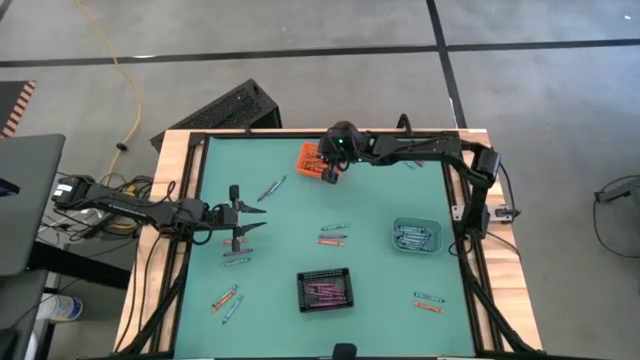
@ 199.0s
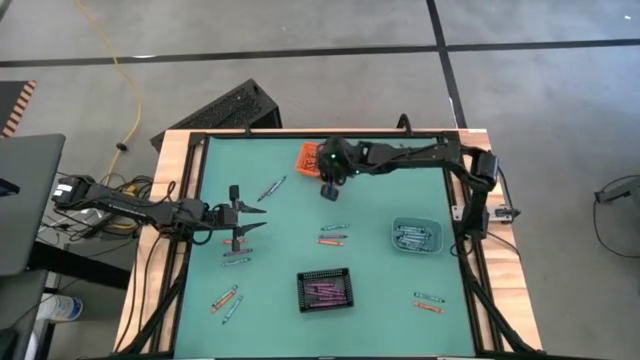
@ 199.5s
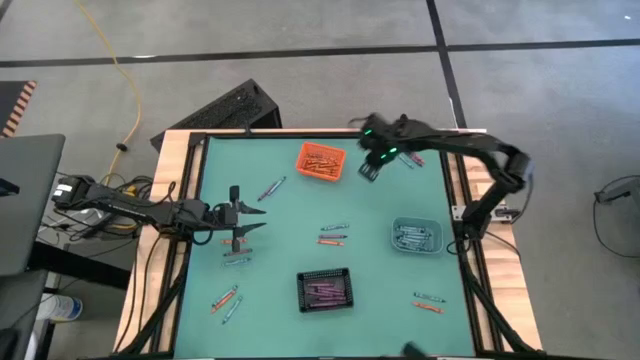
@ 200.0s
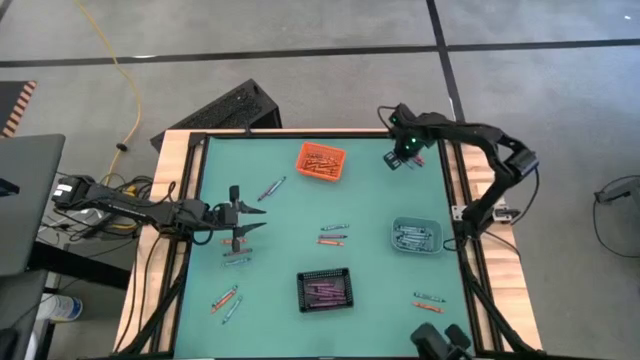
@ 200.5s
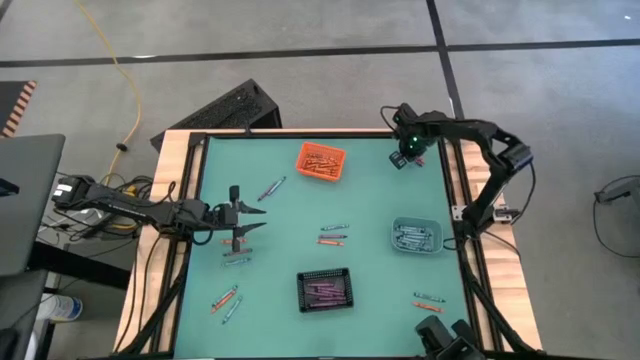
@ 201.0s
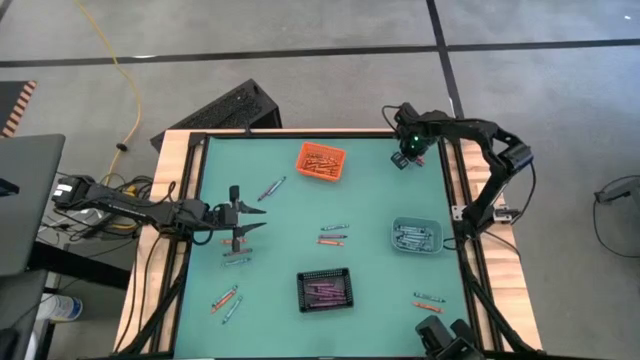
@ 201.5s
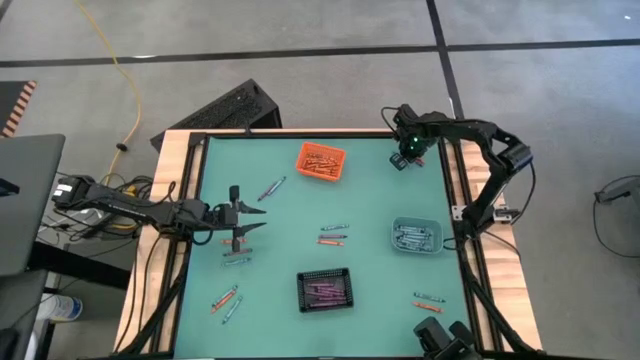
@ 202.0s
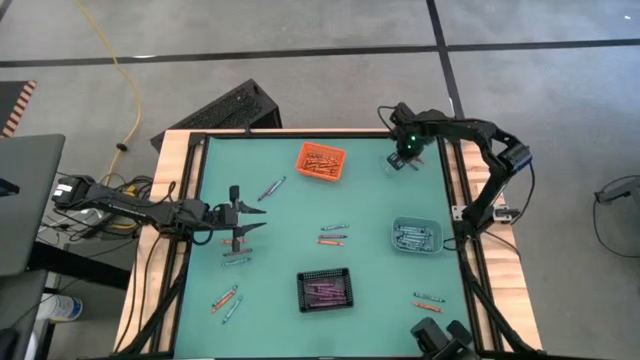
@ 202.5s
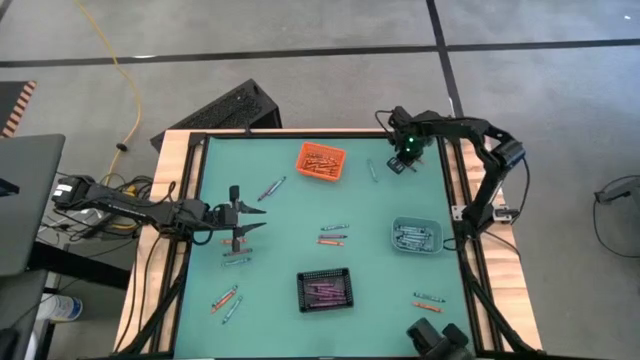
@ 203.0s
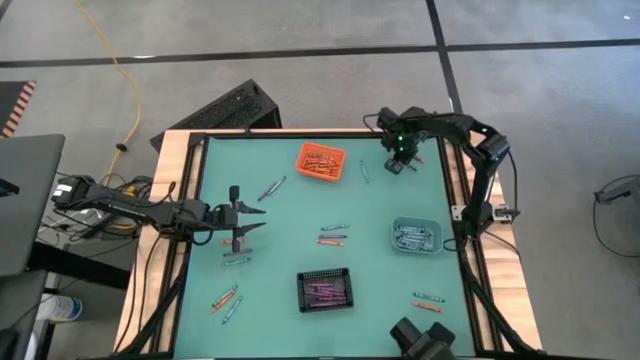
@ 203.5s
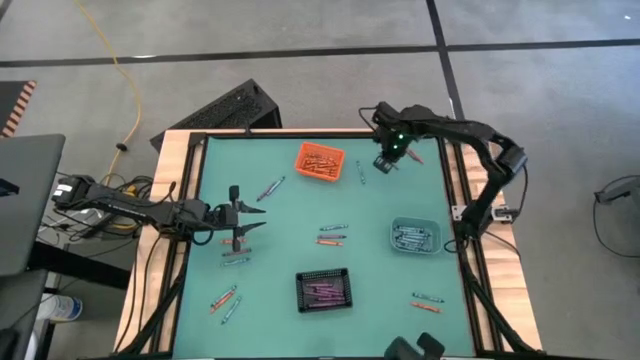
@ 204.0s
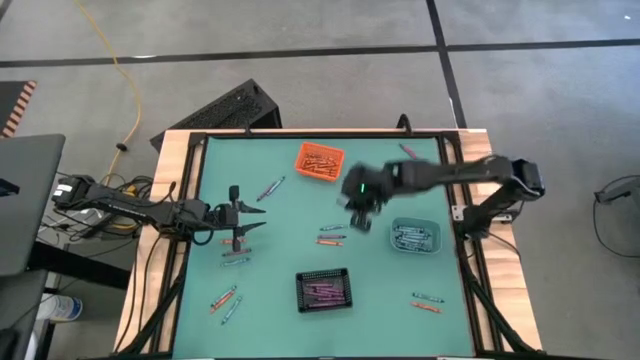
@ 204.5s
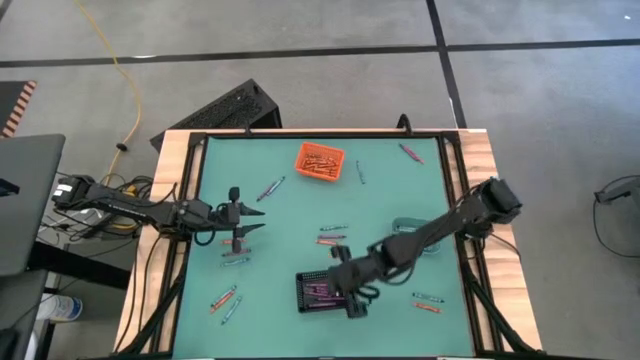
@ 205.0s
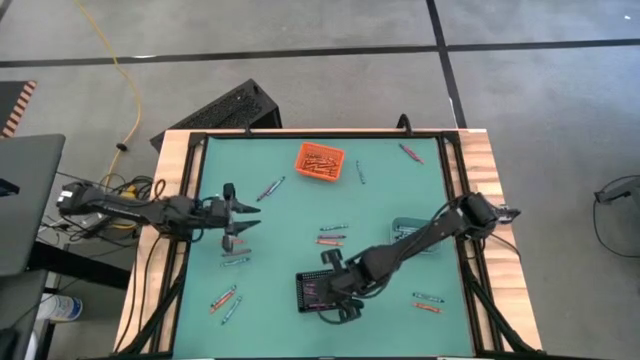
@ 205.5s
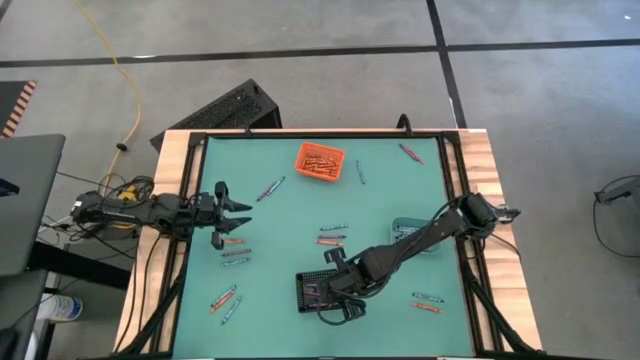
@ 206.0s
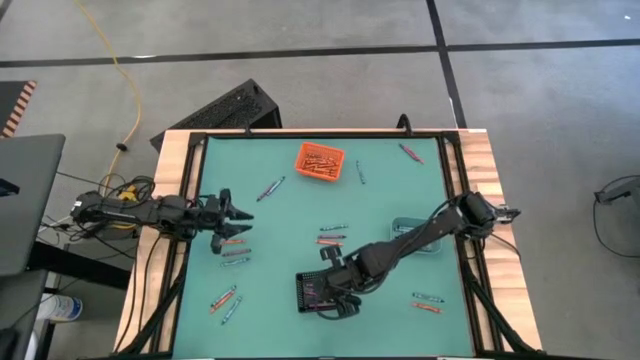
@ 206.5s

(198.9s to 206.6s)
Task: Sort crayons
Put the purple crayon into the black bin

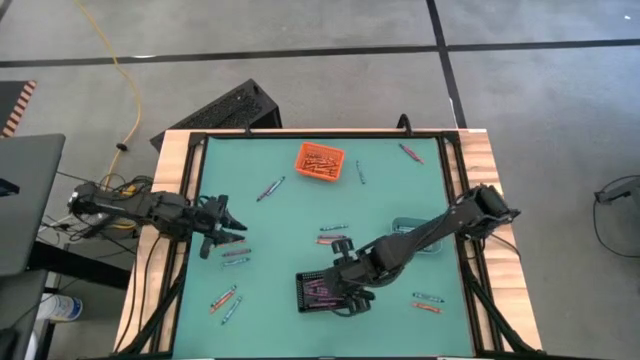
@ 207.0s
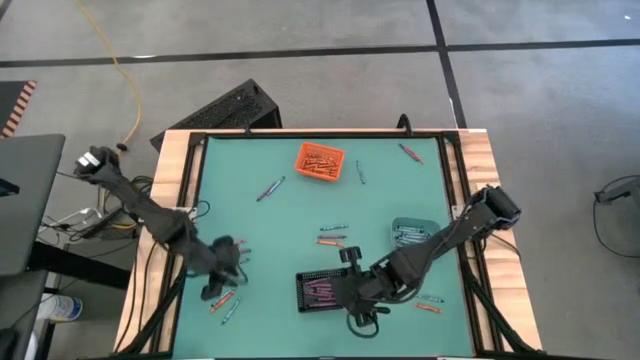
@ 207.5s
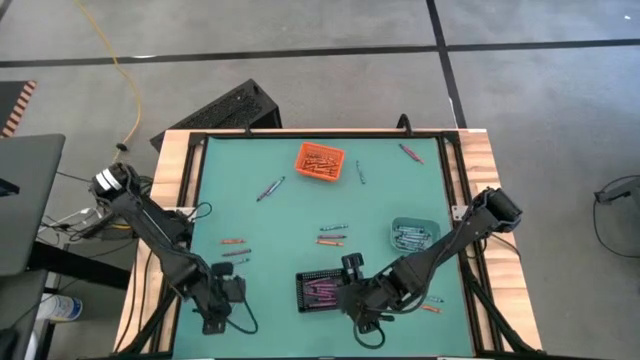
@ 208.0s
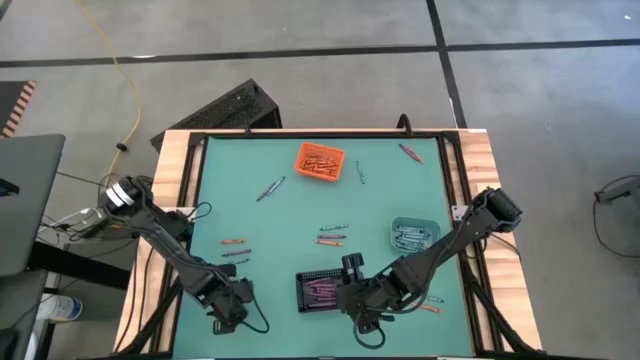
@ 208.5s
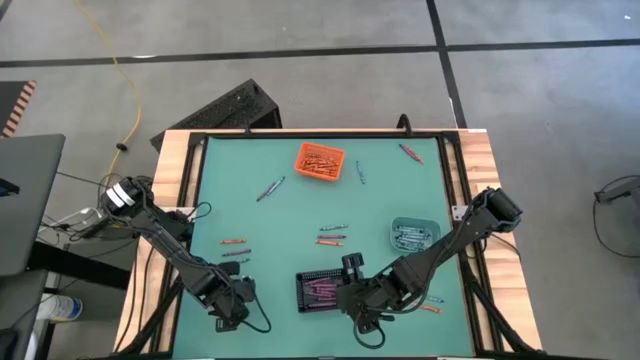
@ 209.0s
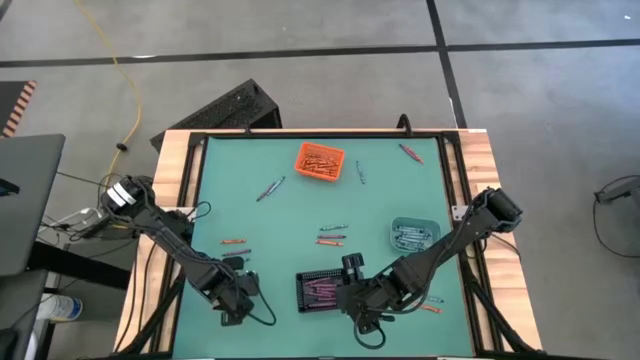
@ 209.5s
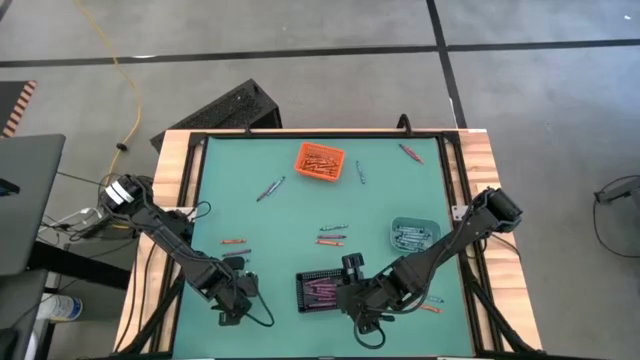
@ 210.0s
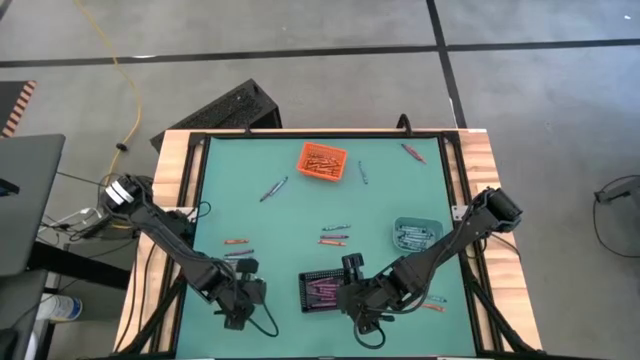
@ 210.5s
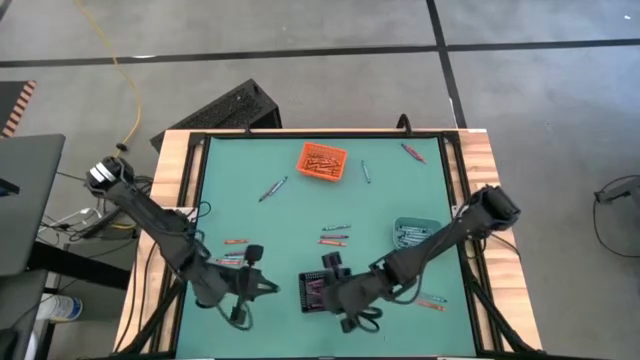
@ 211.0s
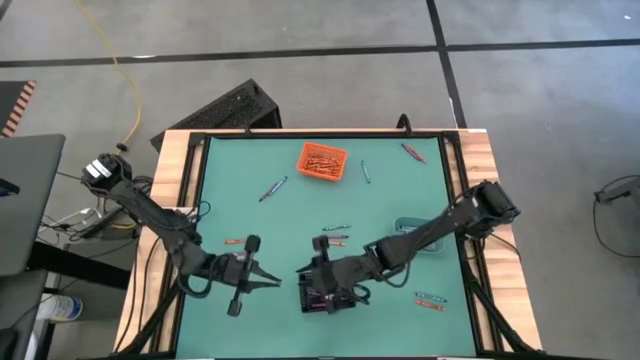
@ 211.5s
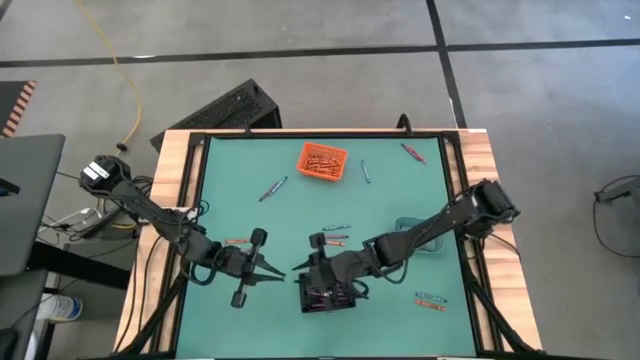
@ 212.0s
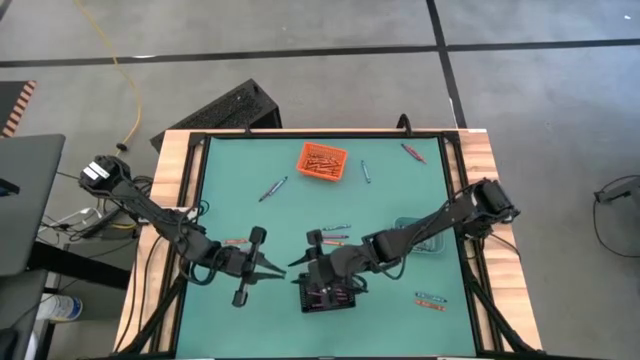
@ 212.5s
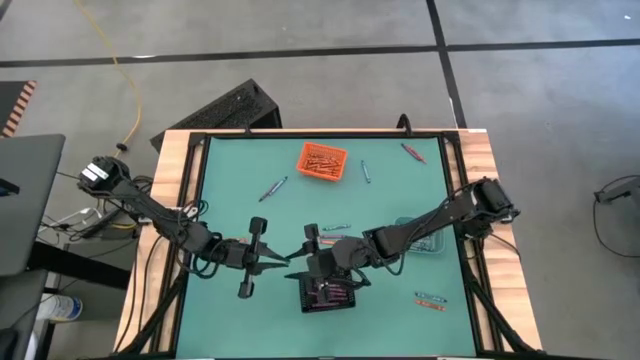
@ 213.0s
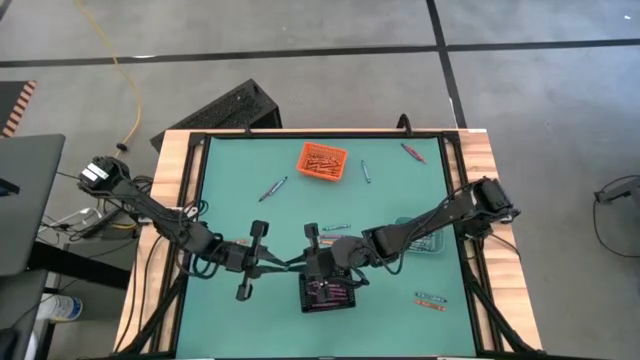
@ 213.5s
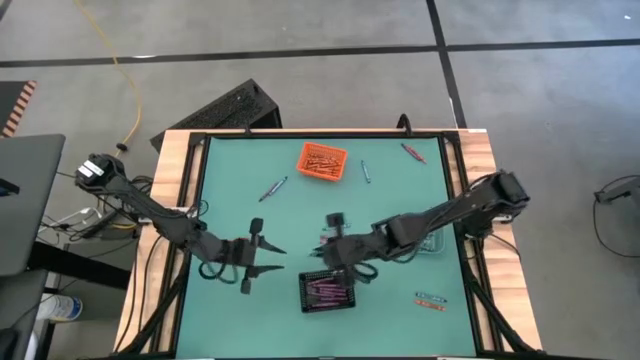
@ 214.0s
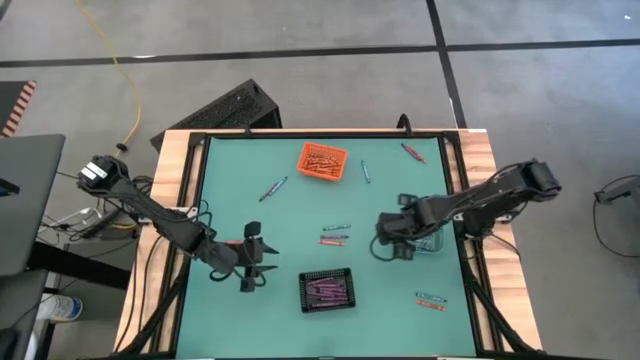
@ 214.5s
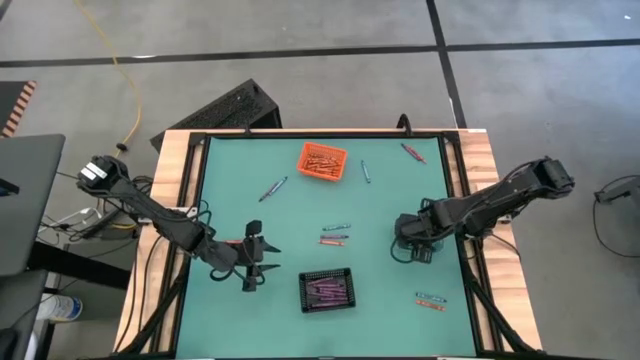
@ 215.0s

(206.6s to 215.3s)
Put the blue crayon into the blue bin

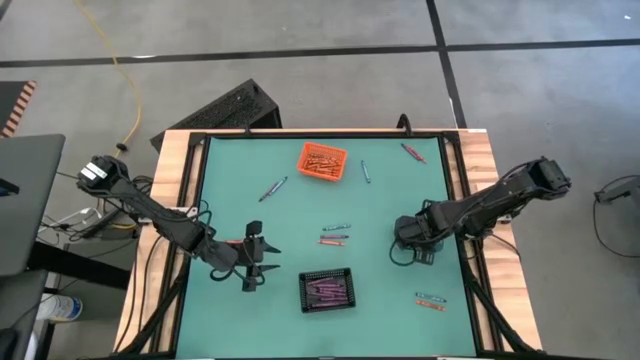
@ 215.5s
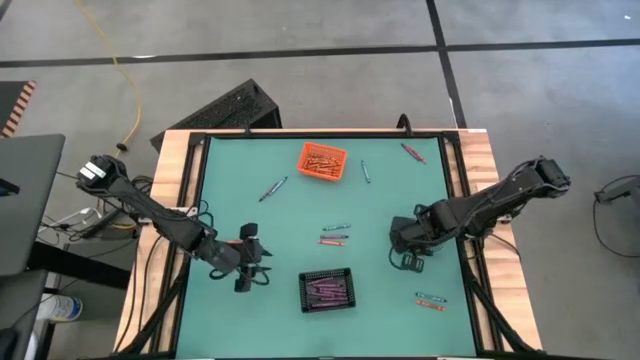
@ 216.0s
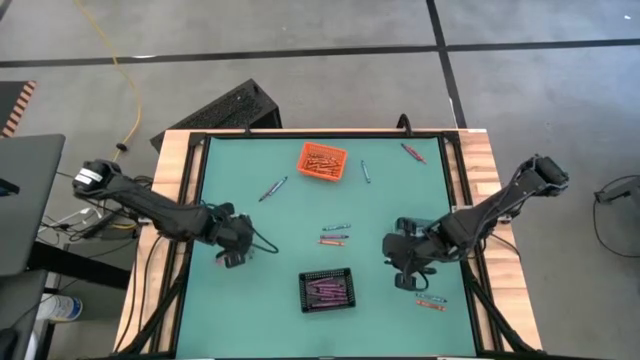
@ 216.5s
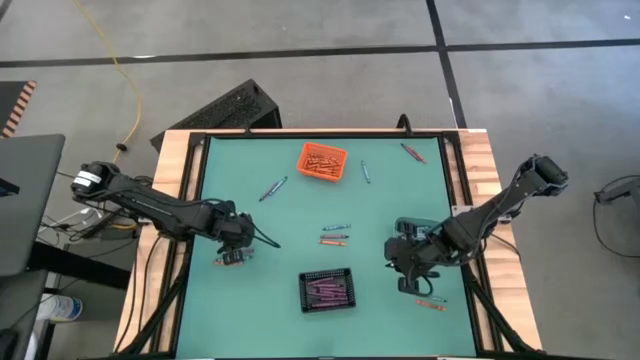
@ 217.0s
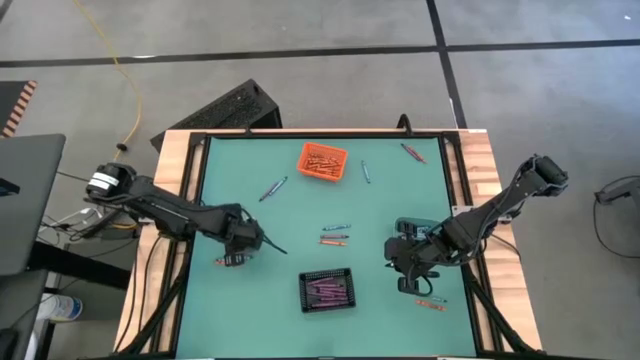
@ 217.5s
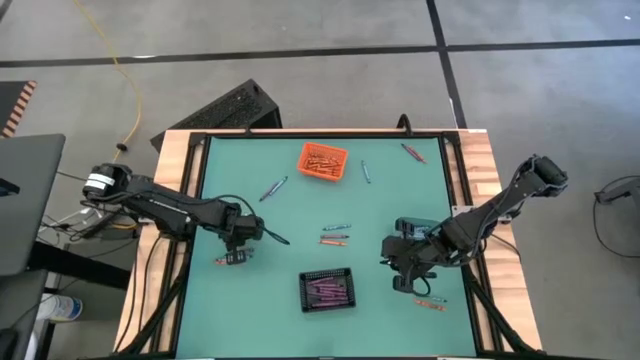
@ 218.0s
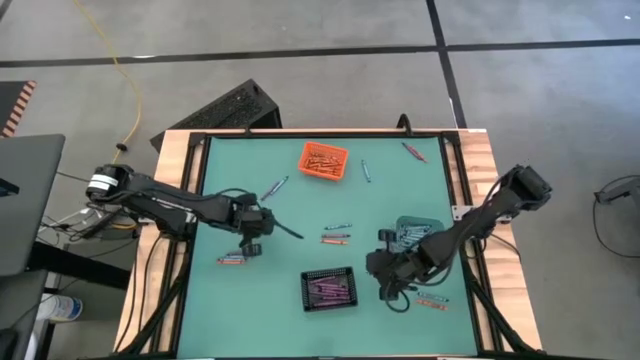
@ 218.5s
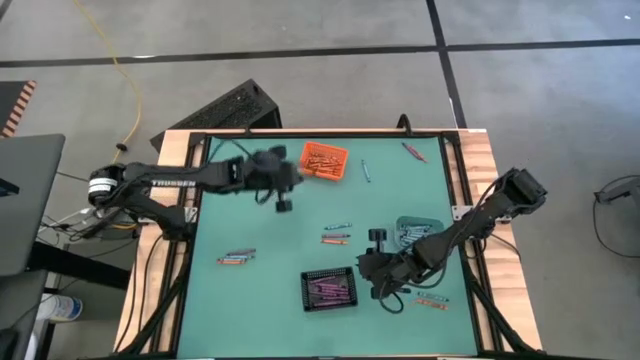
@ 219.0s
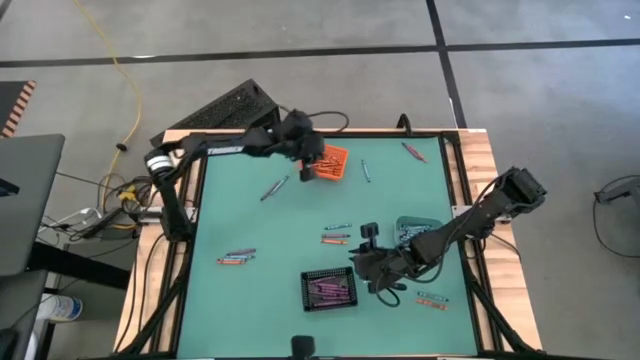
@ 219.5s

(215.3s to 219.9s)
Put the orange crayon into the orange bin
